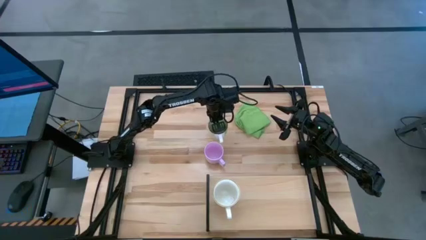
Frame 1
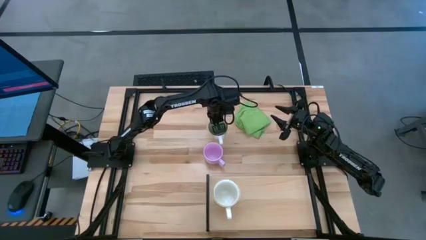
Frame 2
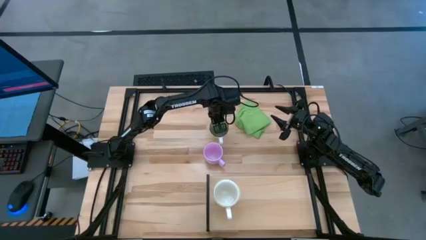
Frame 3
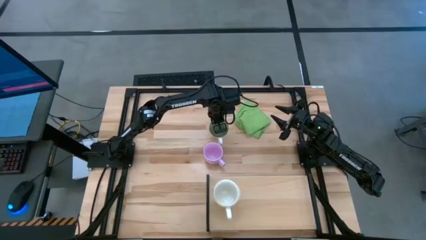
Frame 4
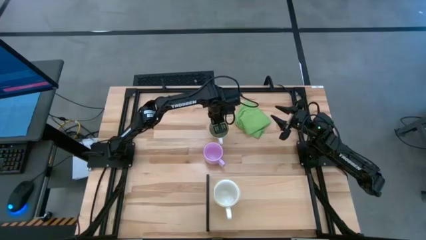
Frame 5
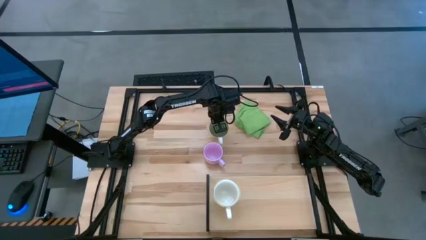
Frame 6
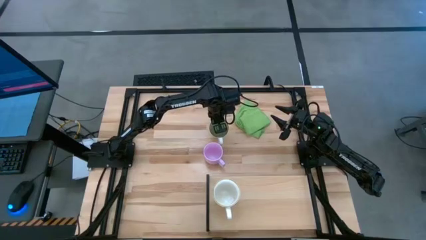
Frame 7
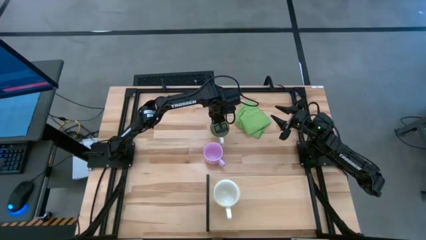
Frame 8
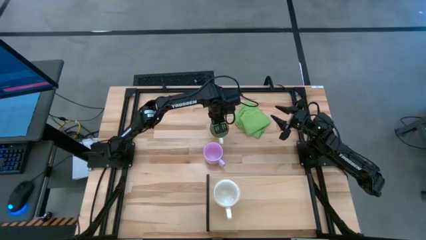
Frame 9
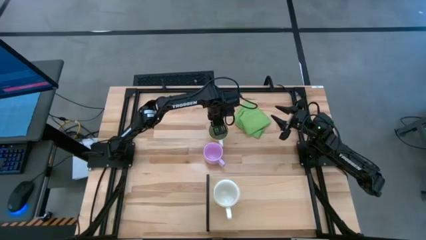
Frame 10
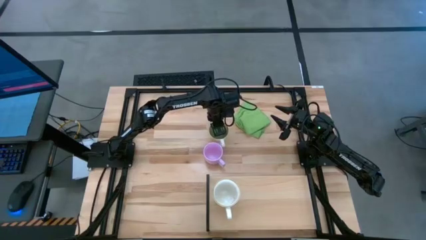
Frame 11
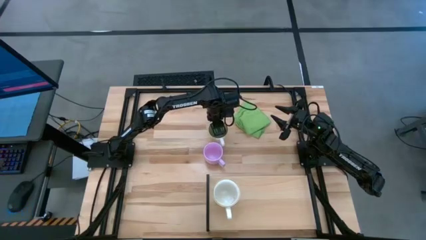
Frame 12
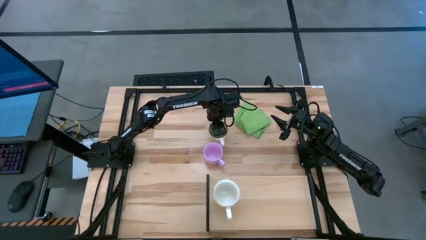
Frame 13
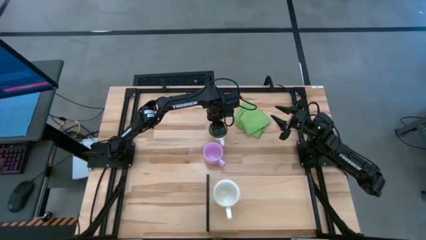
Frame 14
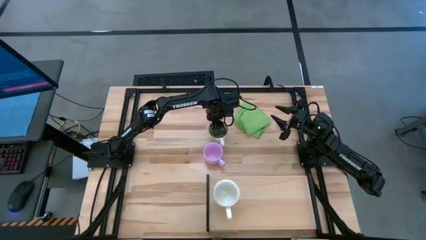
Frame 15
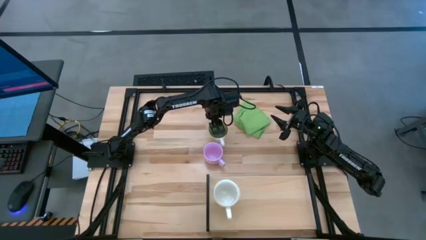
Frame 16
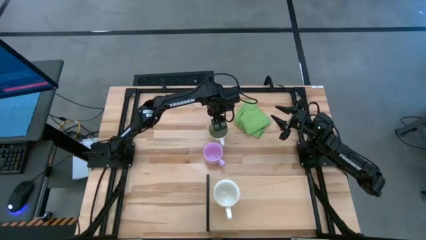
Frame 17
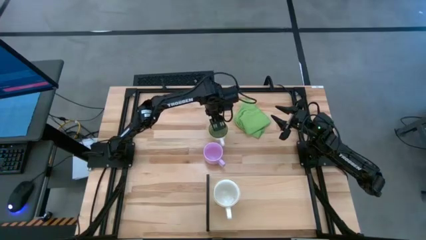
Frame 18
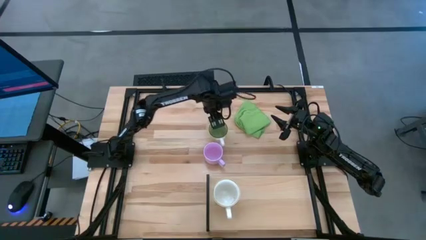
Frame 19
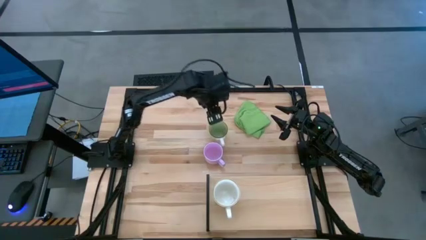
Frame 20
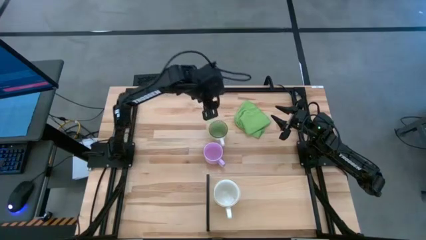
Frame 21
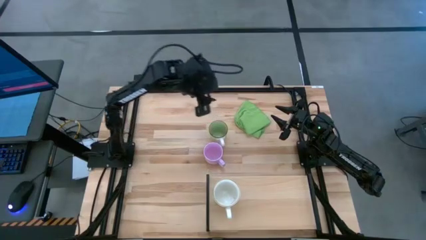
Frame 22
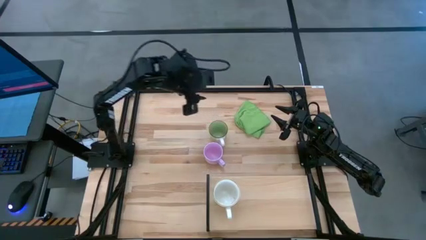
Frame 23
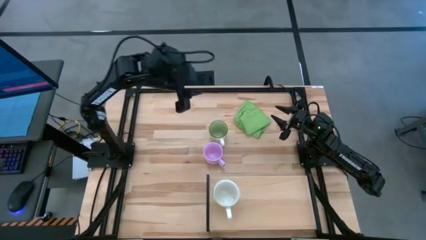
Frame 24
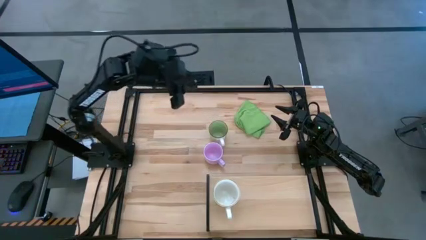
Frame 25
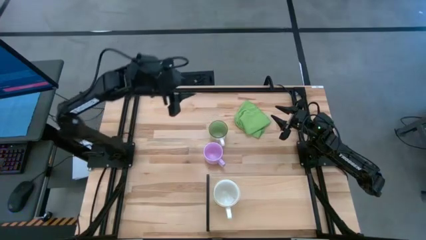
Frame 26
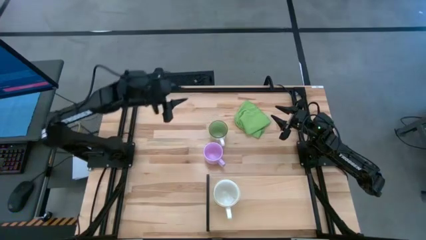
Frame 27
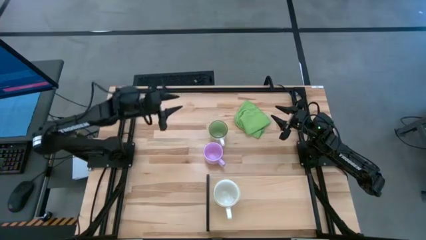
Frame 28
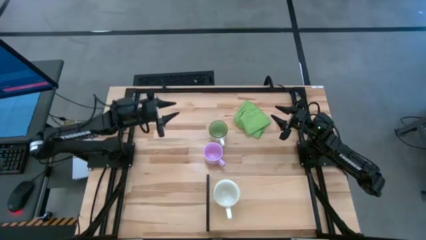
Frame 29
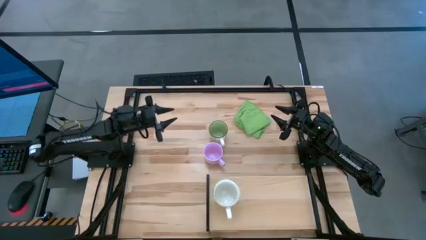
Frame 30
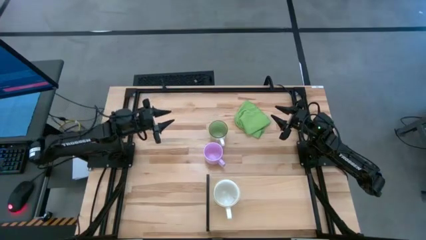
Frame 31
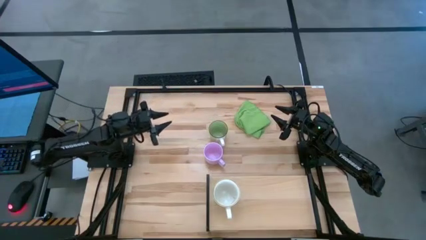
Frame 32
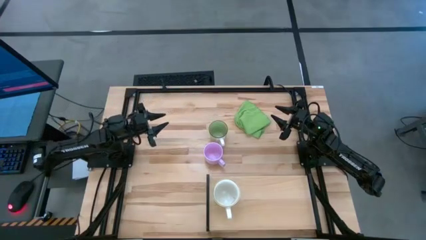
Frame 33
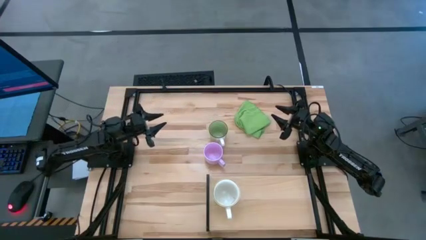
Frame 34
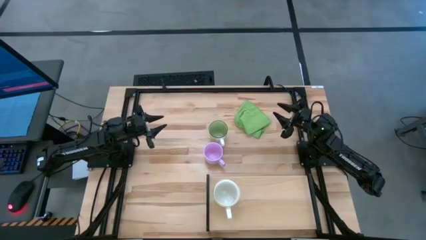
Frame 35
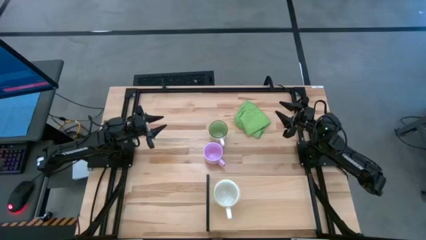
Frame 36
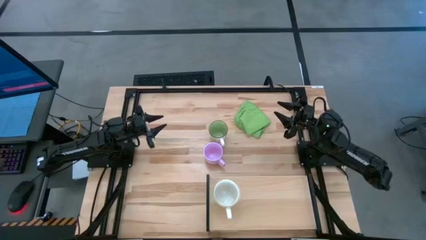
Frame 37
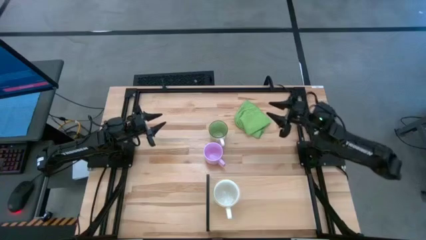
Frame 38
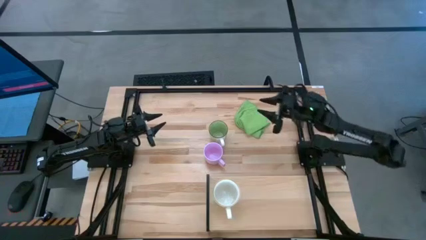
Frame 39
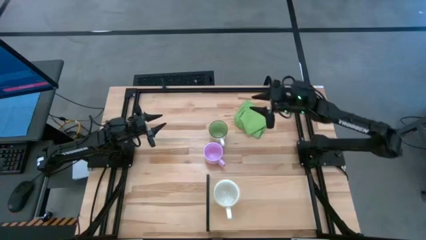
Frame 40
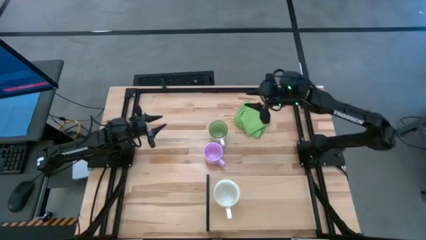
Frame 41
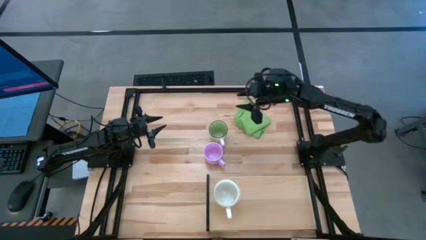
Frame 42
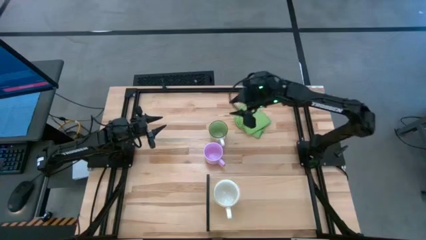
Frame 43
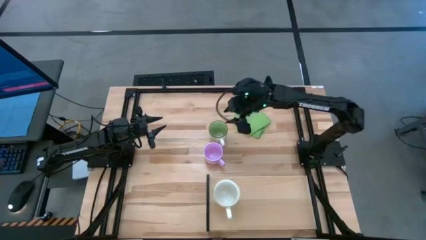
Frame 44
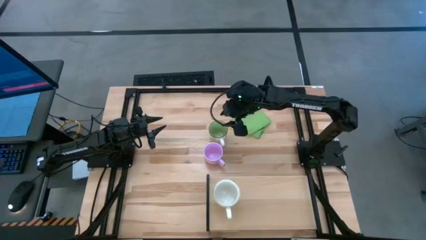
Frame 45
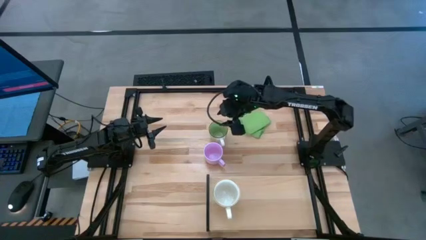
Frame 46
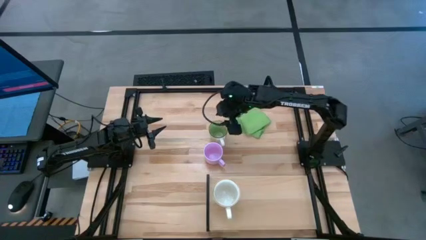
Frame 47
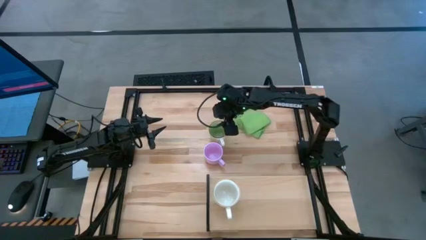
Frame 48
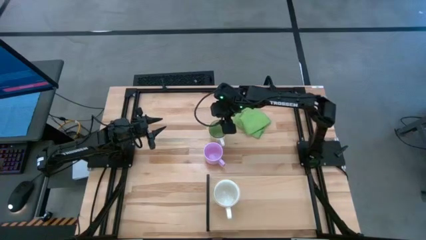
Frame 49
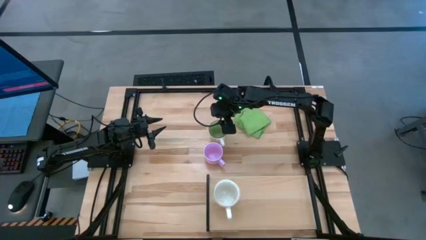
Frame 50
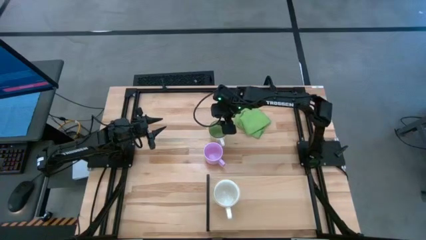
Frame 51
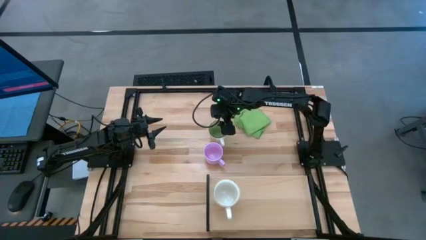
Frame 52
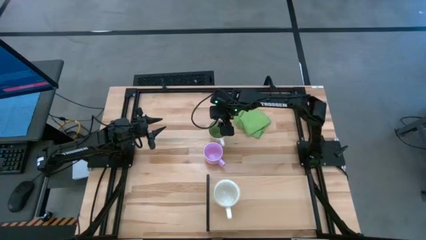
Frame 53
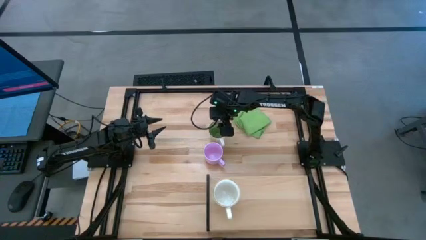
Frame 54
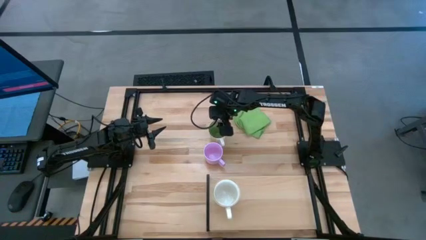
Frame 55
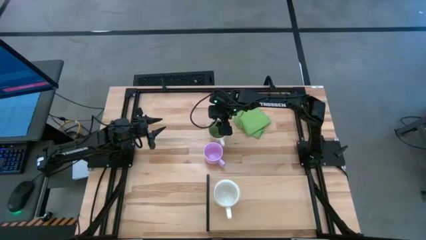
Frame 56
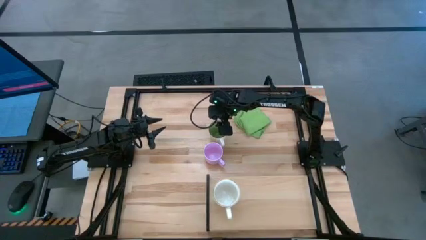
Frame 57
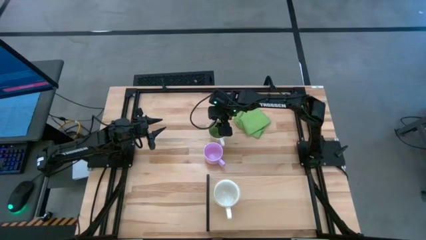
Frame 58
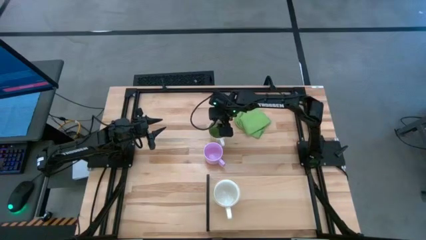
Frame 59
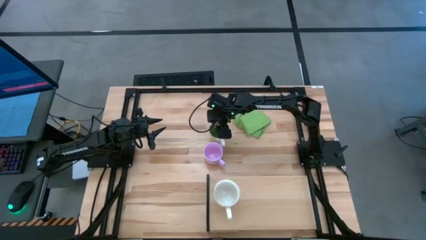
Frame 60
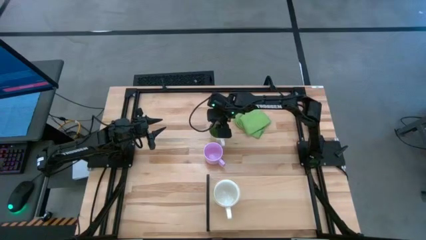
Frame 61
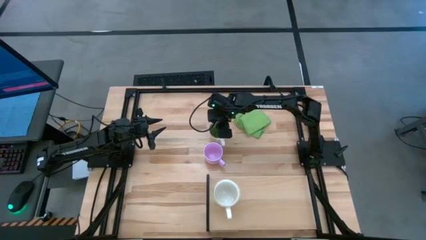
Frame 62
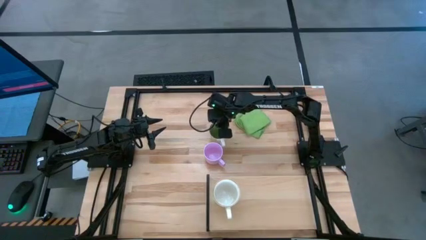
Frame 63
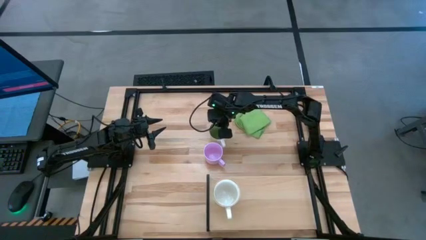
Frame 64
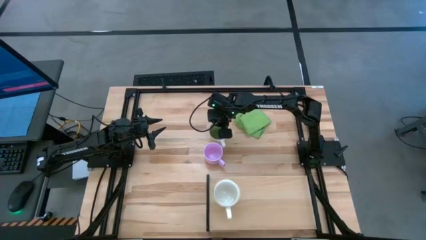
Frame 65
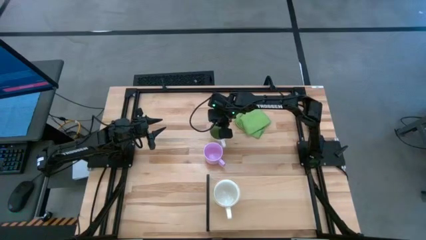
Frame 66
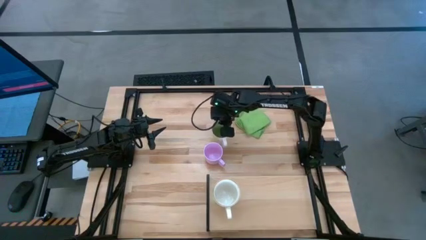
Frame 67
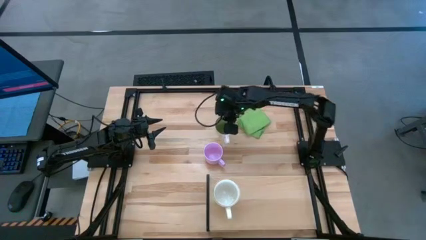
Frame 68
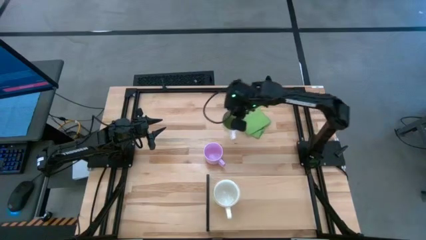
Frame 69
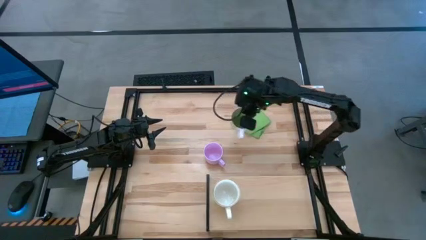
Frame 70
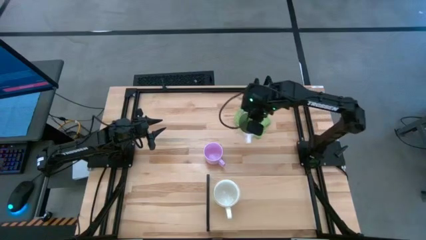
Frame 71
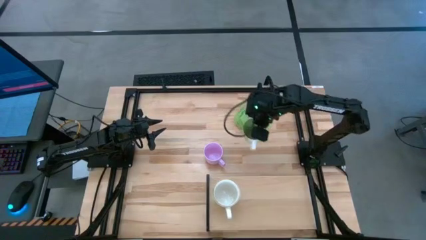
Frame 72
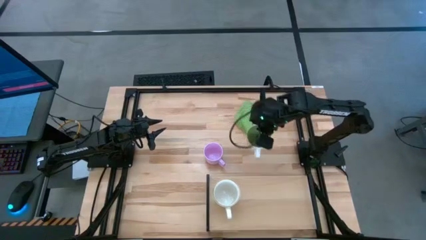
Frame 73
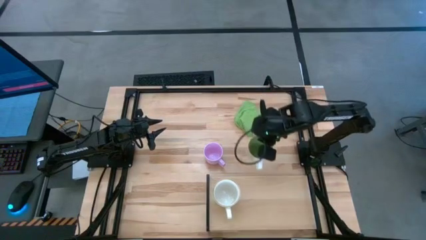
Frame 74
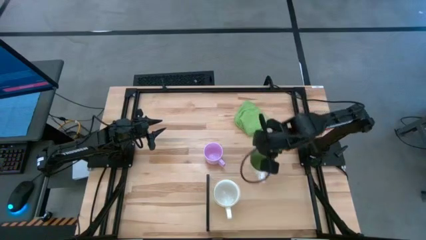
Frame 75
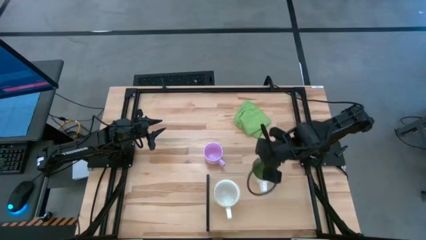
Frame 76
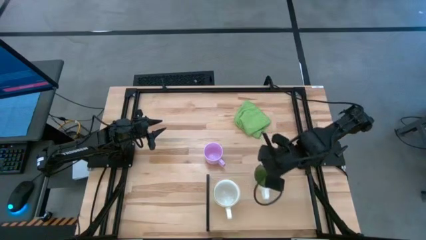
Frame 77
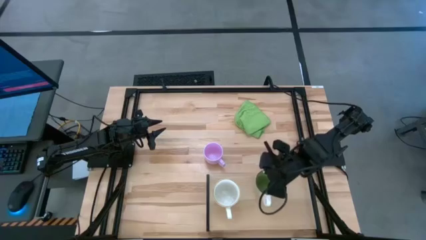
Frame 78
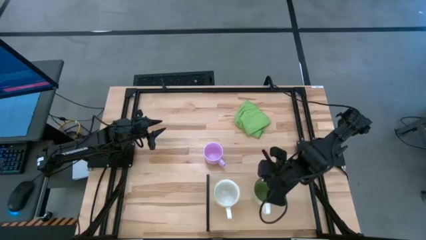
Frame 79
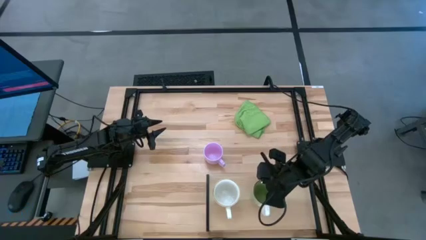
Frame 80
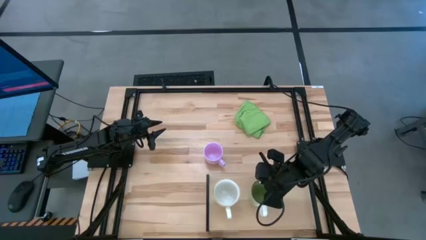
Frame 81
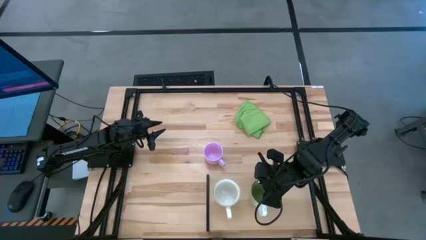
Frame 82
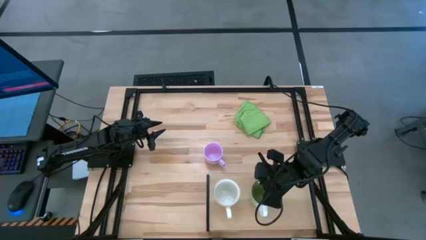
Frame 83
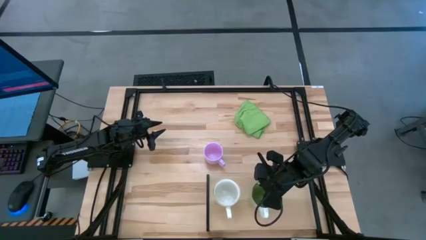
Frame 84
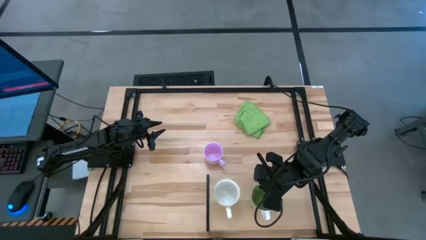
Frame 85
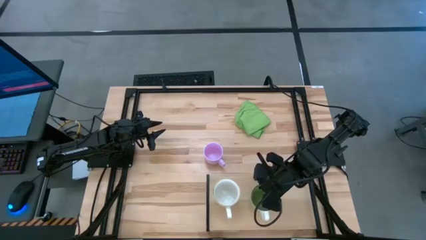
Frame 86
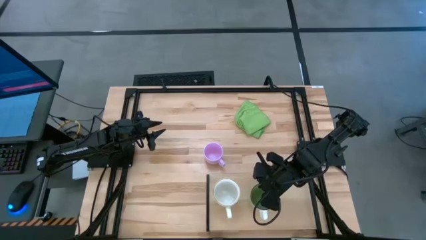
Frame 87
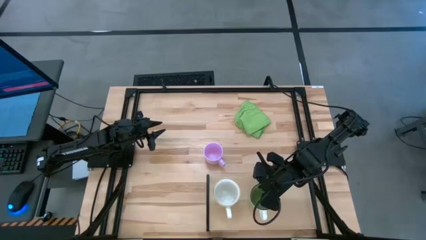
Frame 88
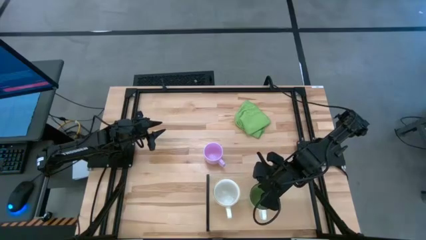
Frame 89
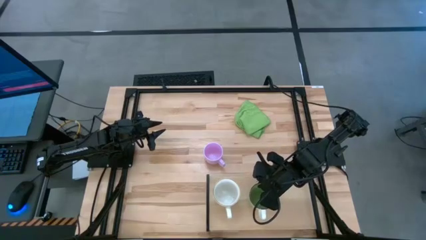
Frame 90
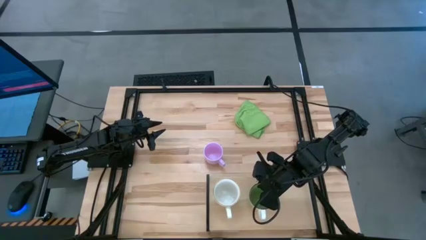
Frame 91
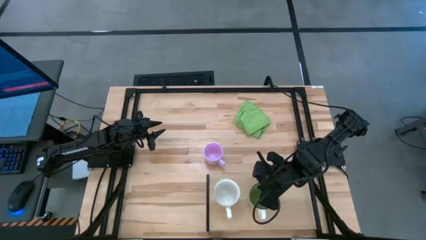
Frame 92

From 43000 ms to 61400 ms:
Task: Stack small to large cups/mugs on shelf
Put the green mug on the shelf
